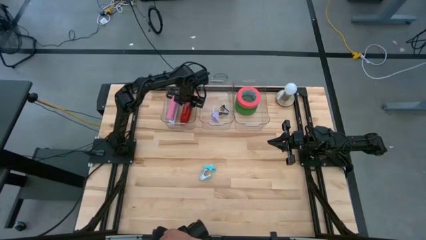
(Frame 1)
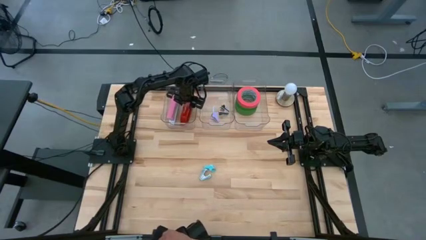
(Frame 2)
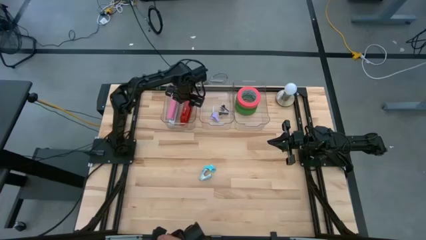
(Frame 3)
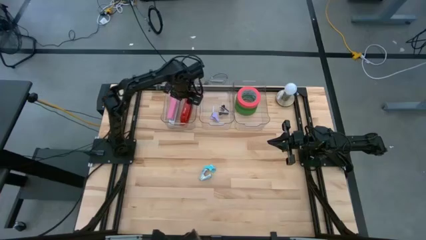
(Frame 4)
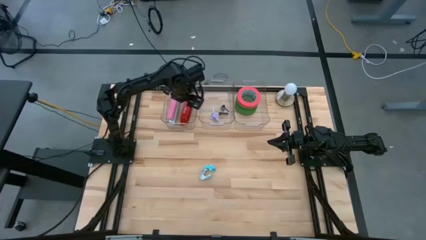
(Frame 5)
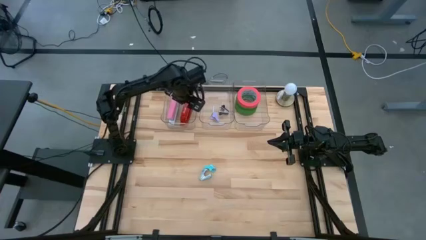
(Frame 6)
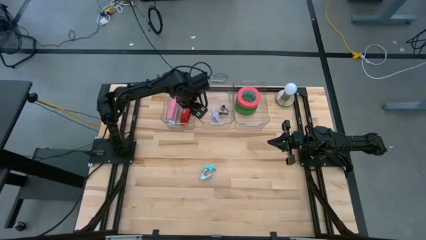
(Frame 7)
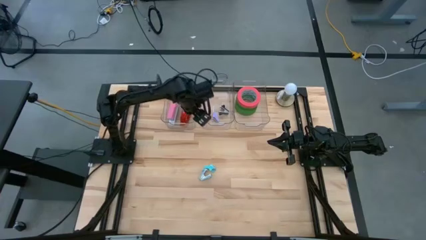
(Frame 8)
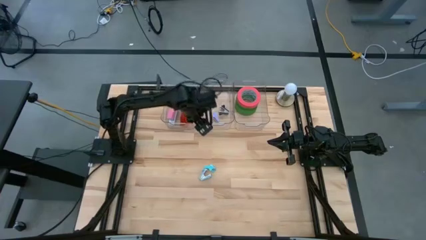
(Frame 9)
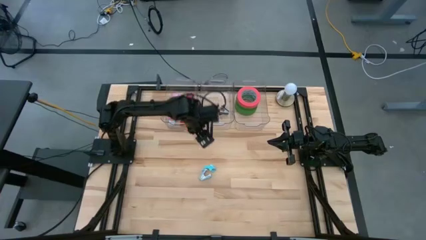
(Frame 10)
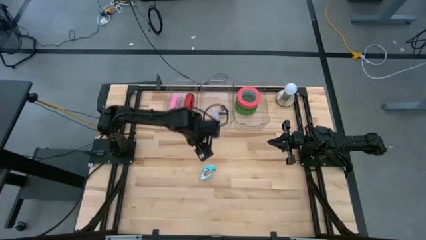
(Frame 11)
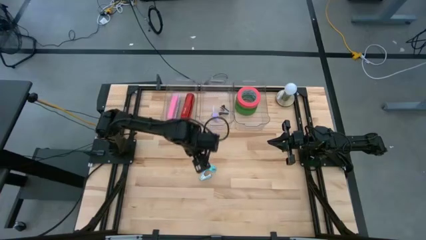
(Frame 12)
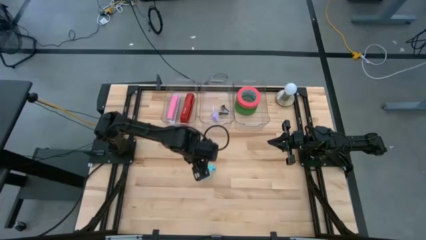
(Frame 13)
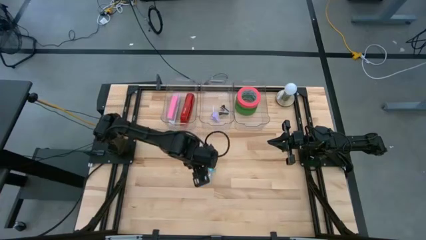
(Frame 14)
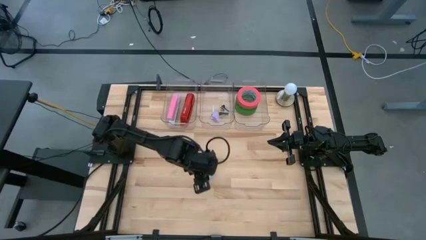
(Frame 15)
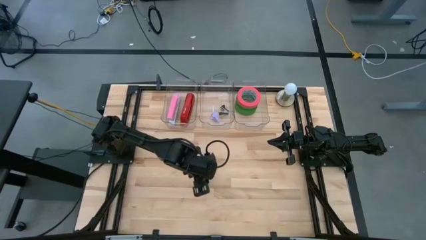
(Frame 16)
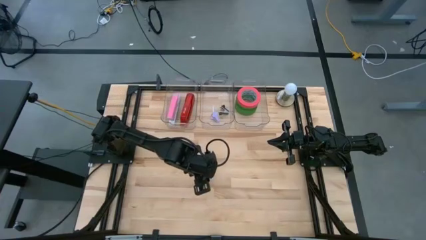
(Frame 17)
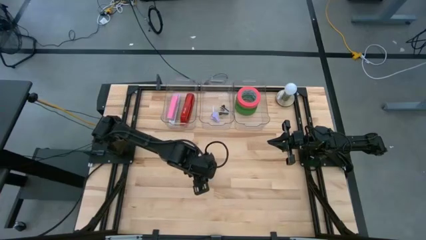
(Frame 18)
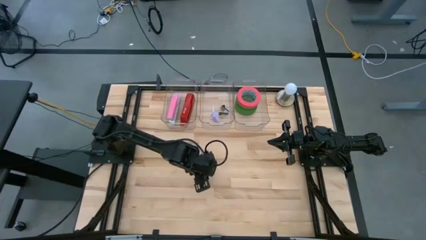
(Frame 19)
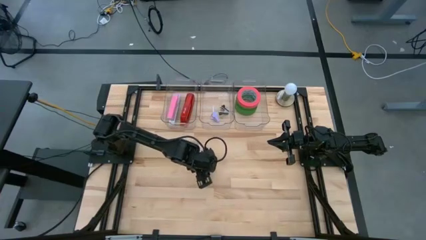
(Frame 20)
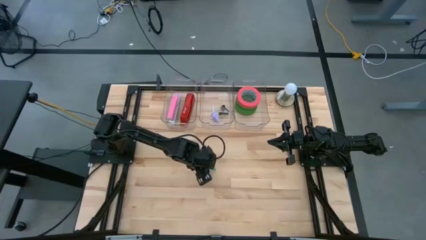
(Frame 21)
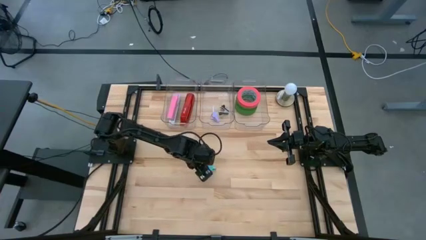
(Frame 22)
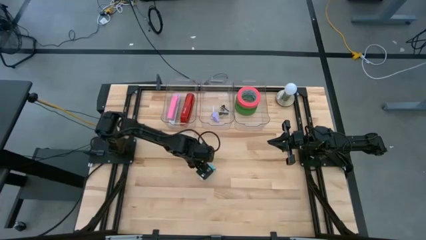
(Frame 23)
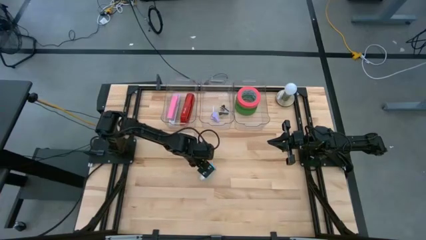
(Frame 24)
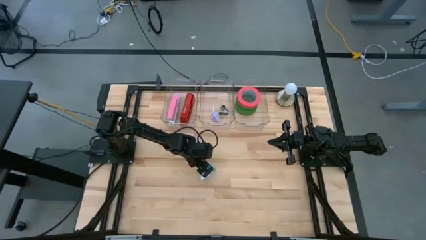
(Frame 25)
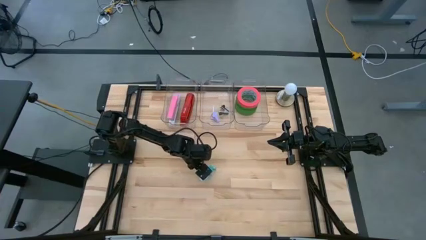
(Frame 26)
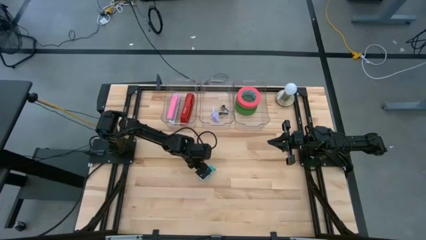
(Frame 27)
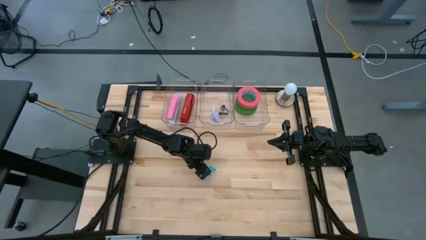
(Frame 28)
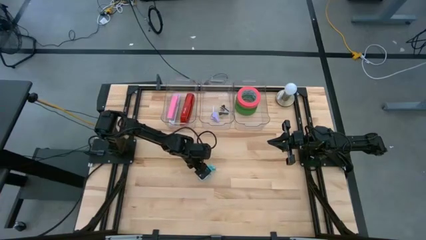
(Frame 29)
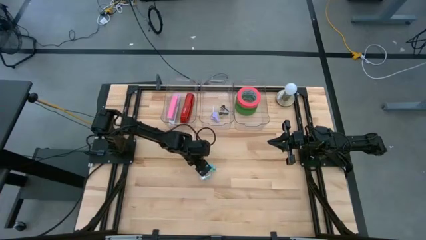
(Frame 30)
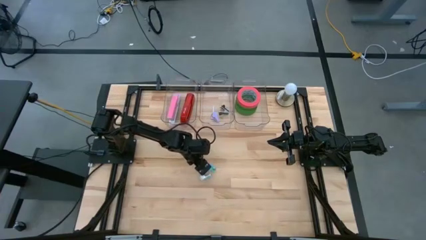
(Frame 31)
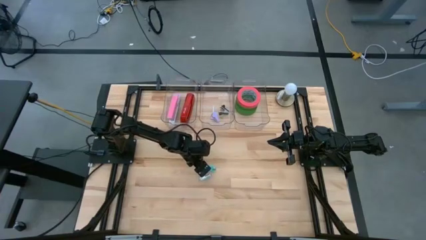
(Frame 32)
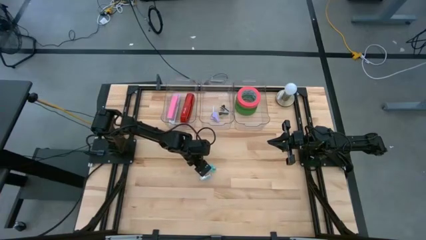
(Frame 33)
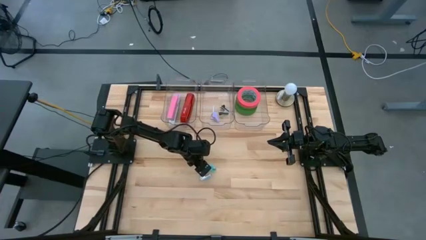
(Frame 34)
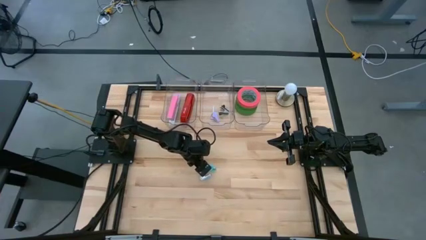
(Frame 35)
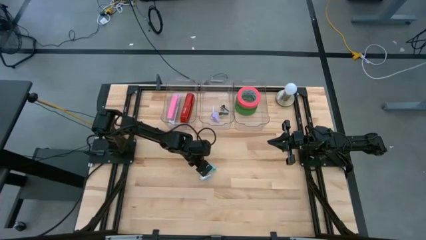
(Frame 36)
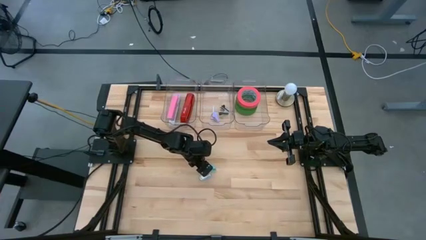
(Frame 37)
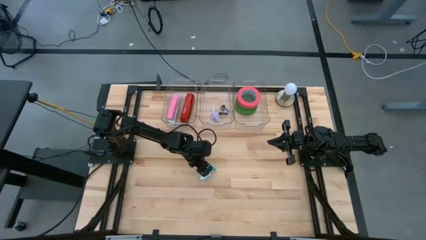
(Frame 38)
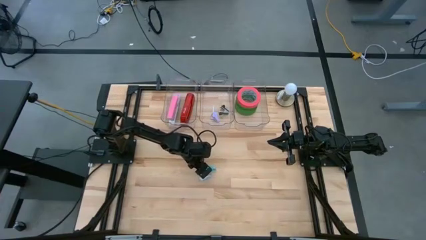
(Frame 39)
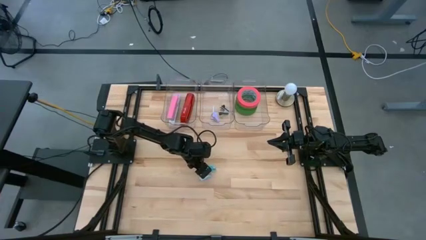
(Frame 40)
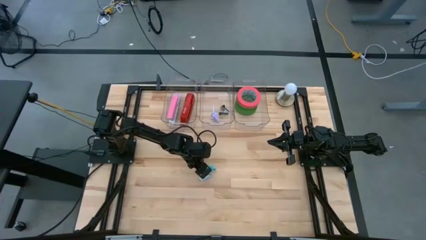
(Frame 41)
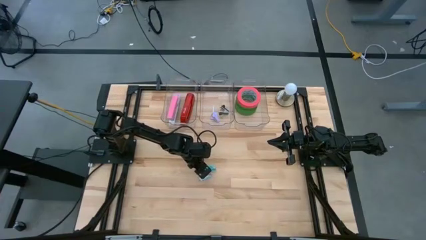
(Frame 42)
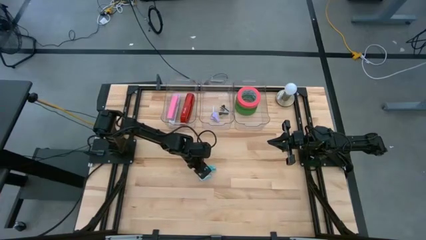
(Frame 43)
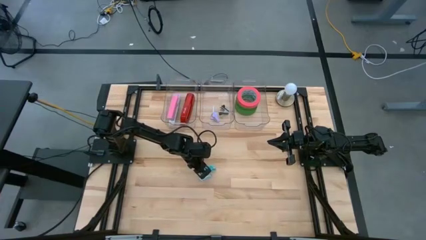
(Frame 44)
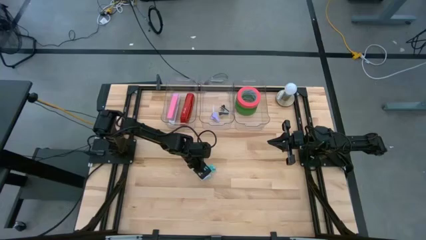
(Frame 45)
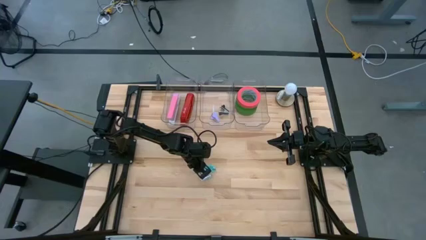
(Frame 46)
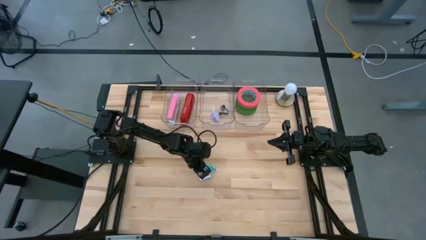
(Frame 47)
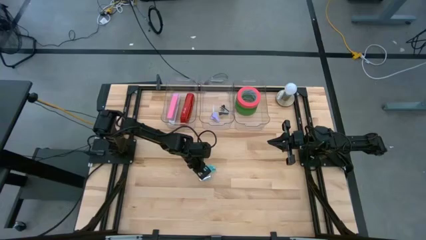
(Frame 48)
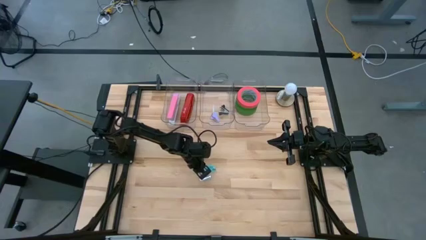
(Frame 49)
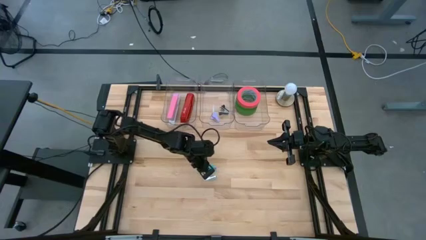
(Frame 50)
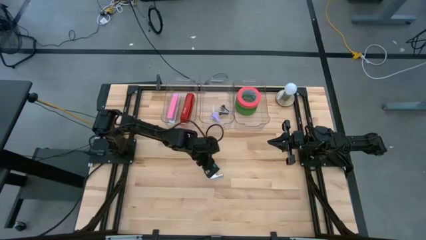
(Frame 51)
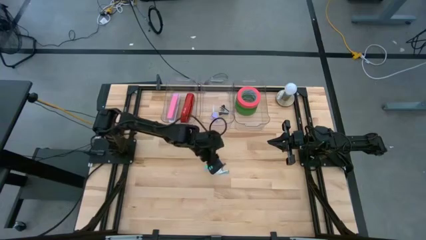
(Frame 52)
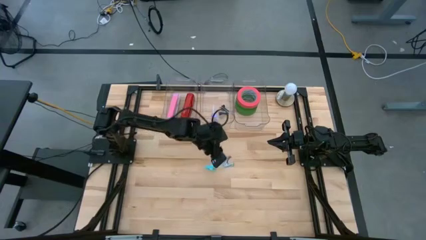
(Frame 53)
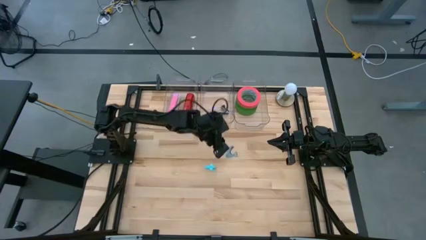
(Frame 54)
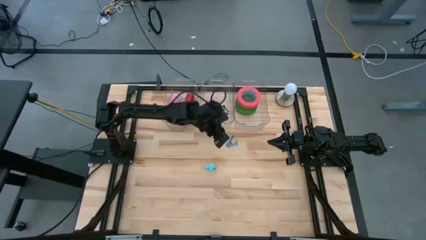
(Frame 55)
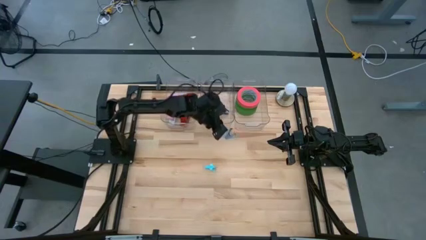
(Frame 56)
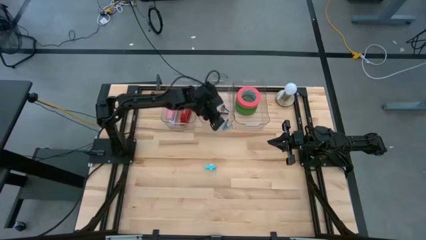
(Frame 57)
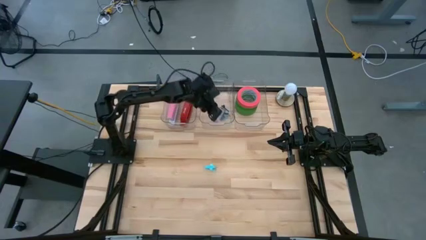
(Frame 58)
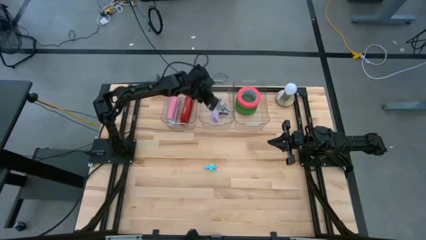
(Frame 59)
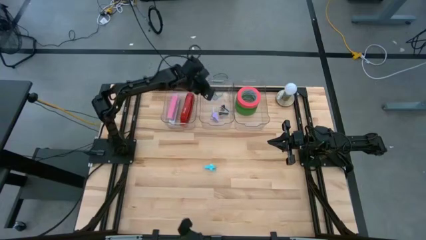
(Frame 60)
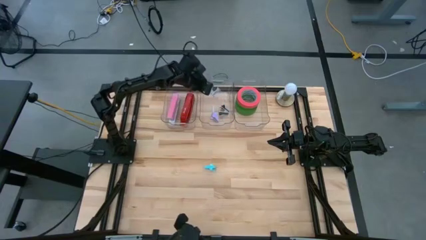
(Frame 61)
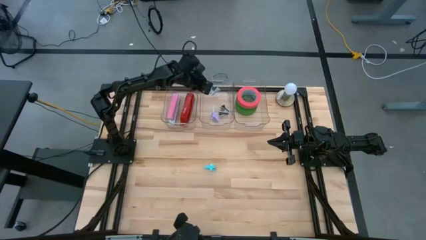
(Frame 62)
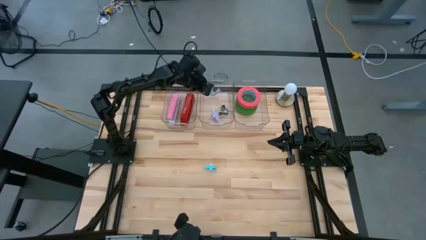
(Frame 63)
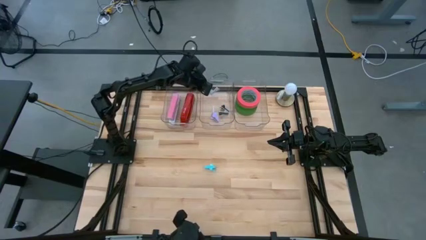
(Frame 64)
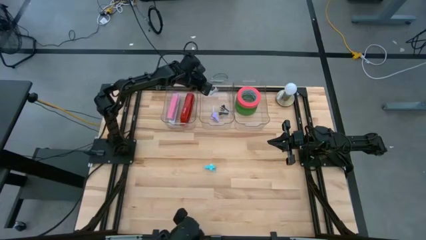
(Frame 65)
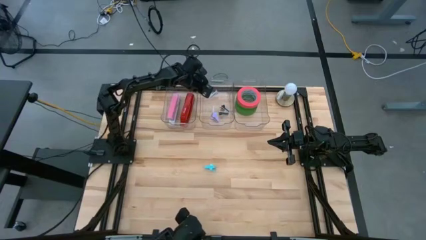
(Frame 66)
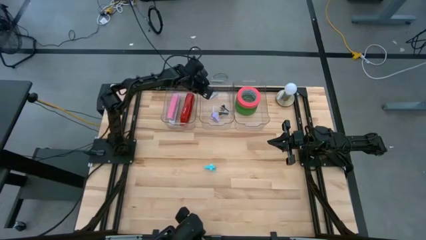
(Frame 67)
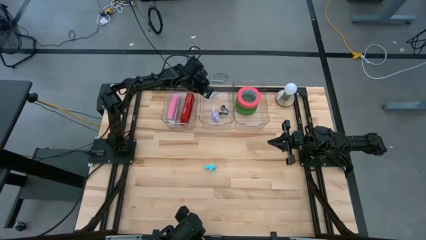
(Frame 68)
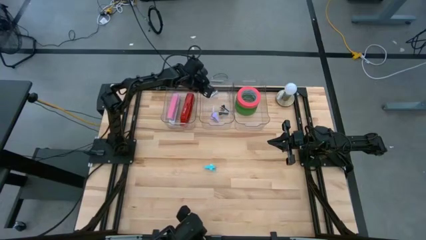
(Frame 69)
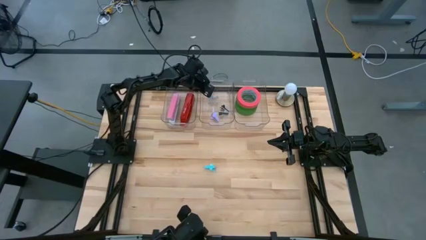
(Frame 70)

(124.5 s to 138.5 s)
Task: Pick and place Stapler, Stapler remover, tape
Put the blue staple remover into the middle transparent bin

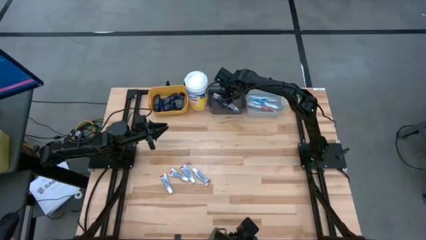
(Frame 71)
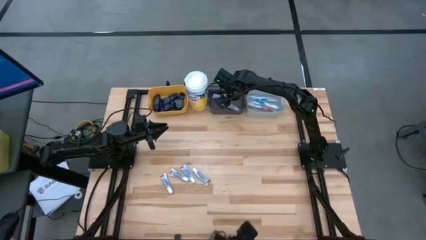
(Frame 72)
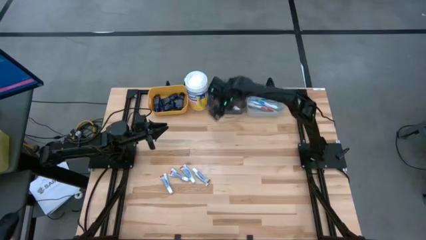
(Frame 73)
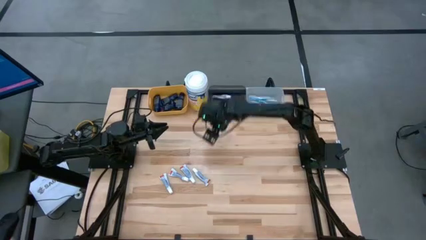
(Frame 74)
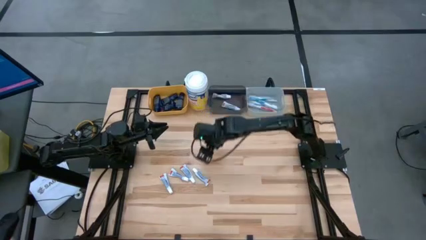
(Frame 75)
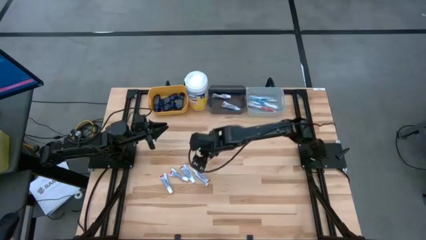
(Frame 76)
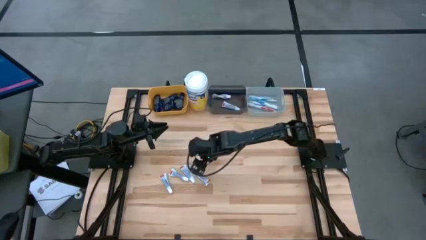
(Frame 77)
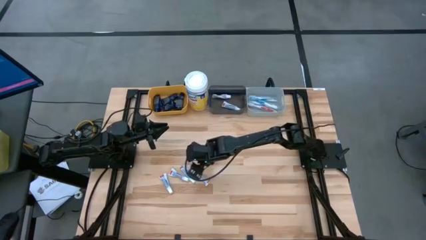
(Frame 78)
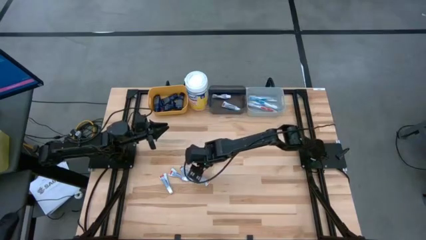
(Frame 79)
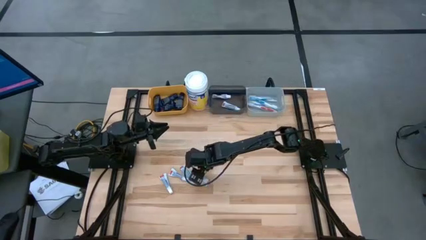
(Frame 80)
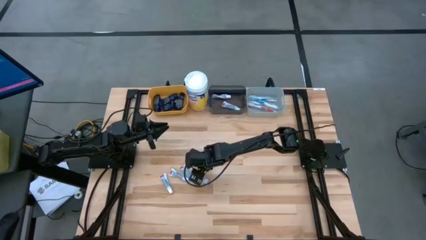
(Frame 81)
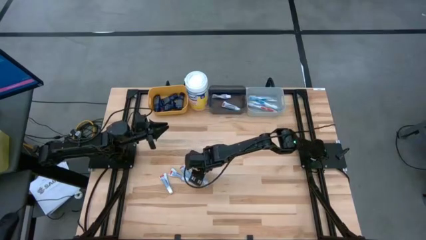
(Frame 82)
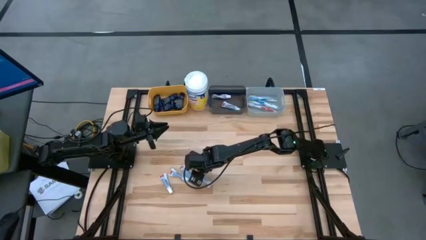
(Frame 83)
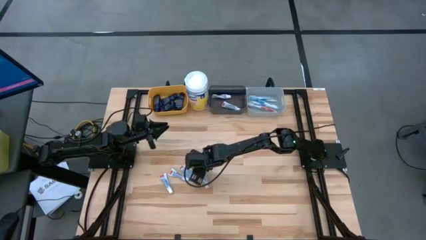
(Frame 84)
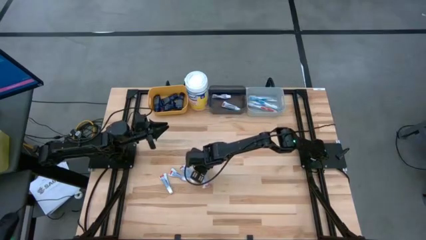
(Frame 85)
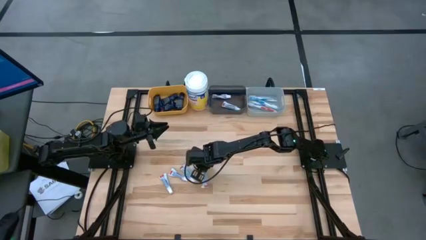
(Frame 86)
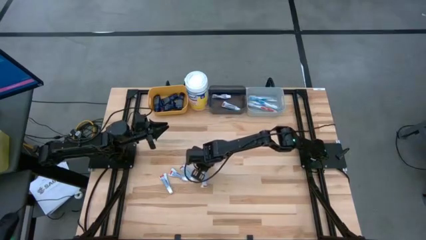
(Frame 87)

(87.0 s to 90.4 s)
Task: Pick & Place Travel size toiletries
Put the white toothpaste into the black bin
